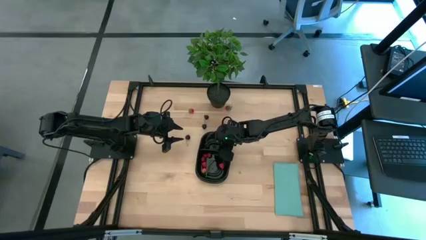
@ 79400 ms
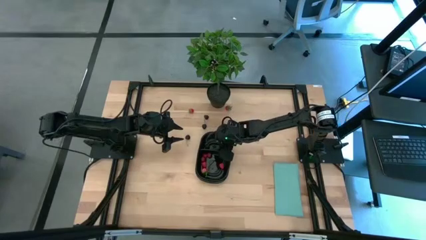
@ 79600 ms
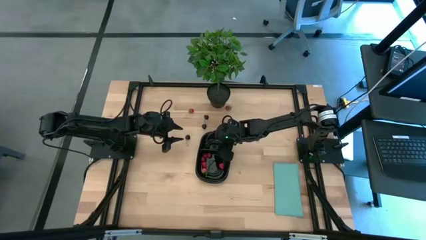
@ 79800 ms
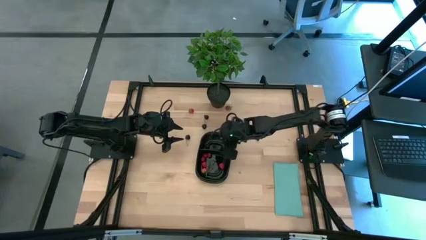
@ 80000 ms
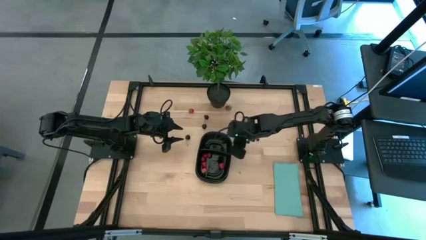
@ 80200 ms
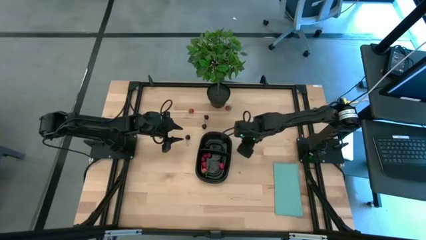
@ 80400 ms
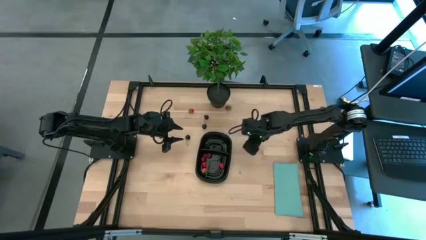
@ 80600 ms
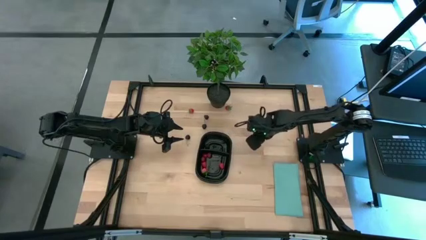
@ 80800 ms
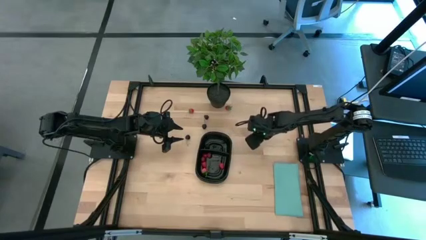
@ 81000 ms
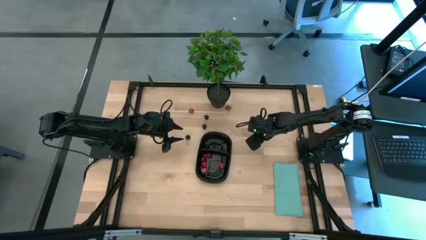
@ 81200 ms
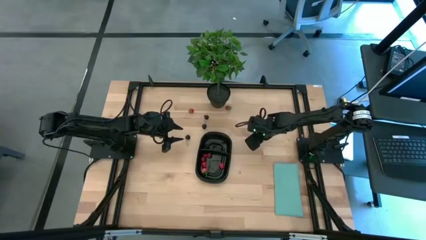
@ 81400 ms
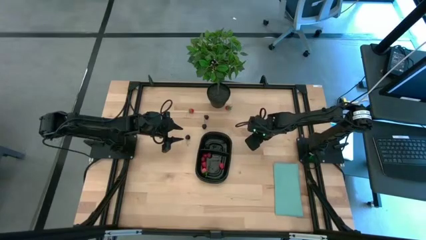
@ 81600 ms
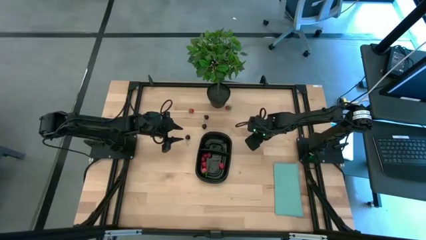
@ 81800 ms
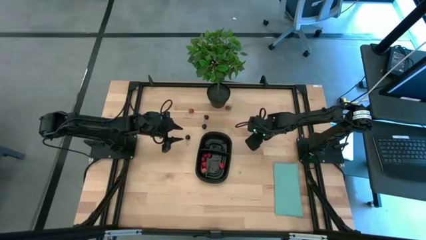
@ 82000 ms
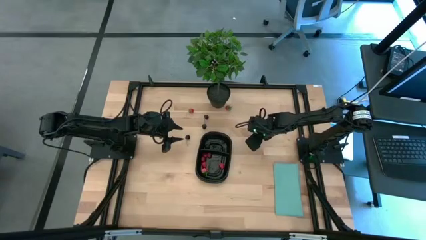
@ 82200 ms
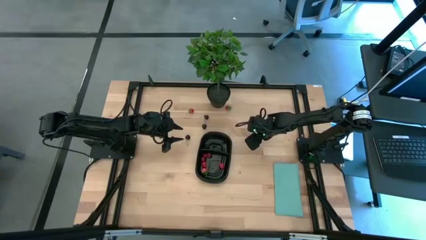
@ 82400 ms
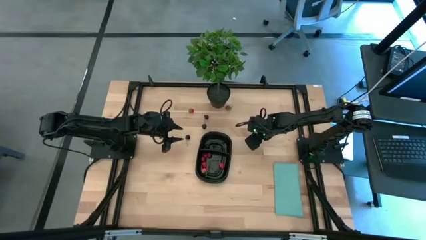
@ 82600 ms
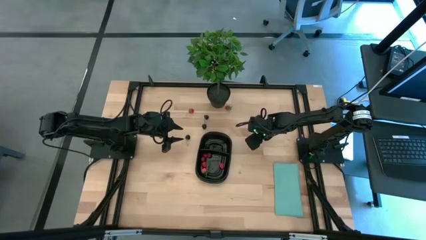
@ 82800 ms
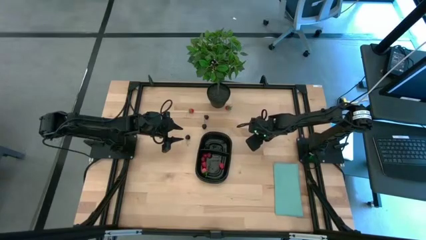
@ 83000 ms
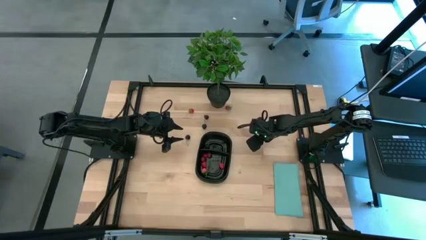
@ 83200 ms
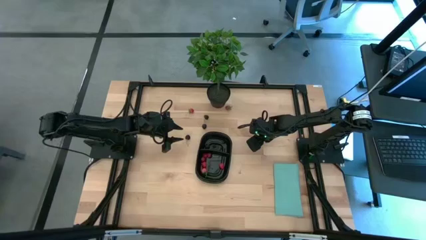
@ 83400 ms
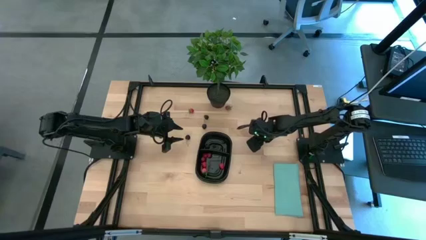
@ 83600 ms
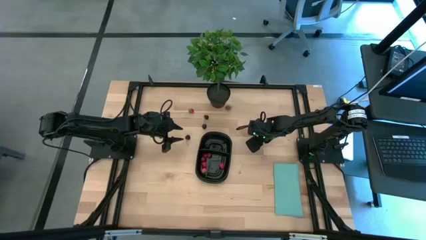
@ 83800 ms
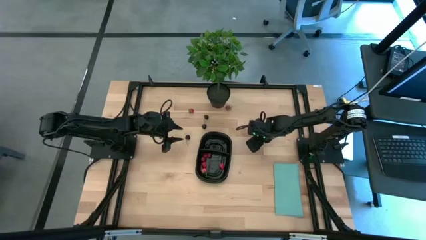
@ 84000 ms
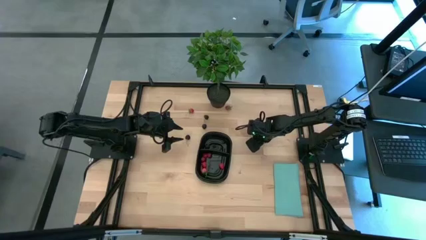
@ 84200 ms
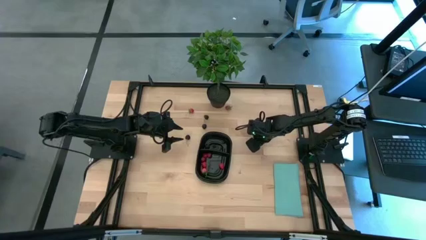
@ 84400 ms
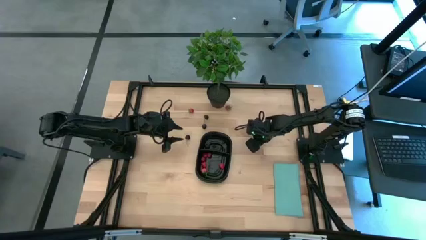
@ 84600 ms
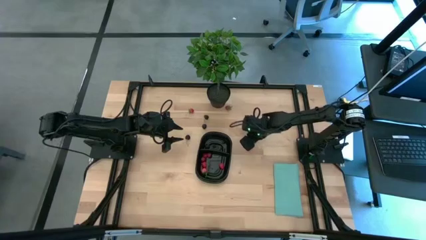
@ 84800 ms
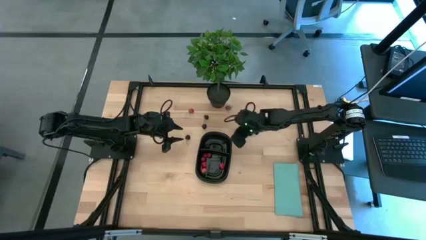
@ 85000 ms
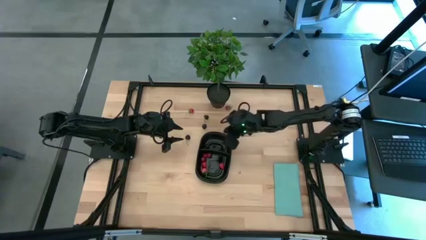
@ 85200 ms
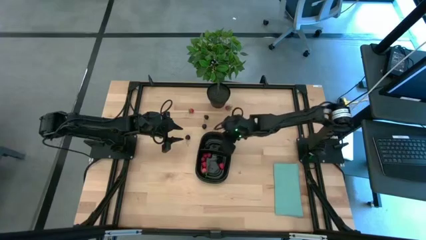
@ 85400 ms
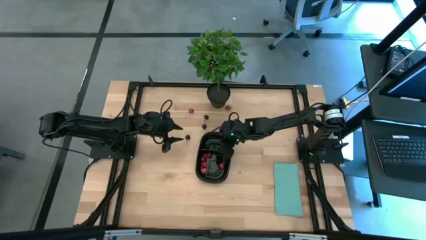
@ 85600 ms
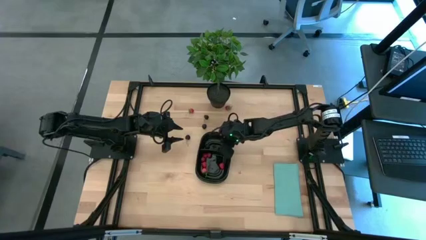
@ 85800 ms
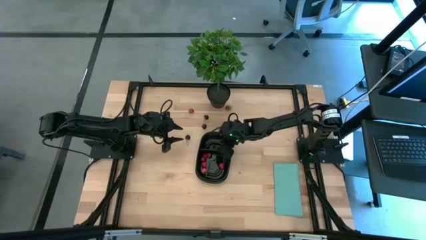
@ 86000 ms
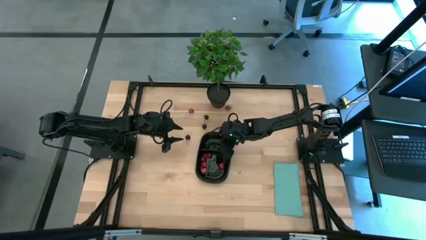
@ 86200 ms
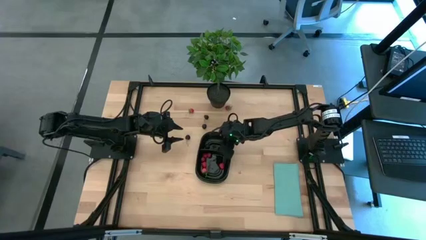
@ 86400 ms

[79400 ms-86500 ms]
Task: Pick and placing Produce into tupperware
Put the blueberry into the black container with the other black fruit

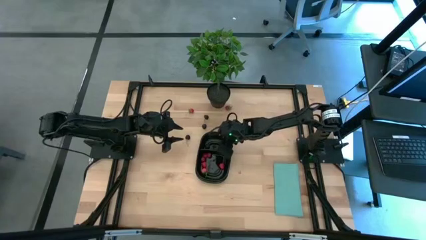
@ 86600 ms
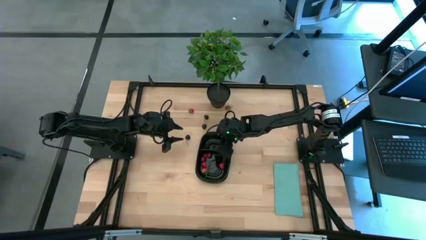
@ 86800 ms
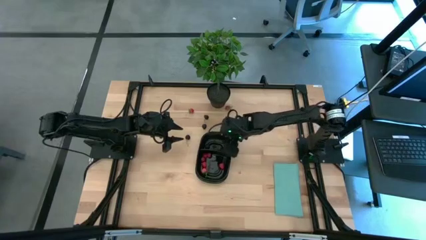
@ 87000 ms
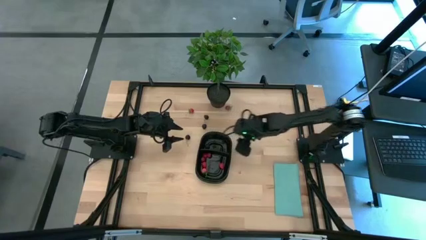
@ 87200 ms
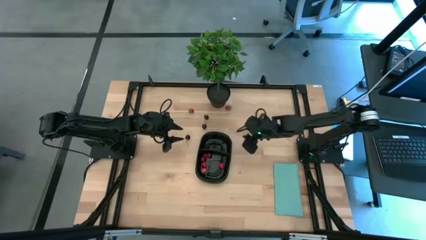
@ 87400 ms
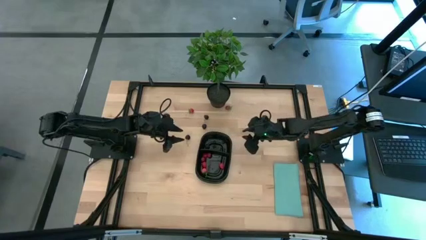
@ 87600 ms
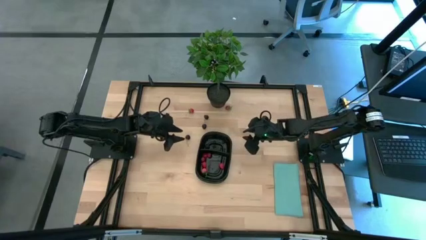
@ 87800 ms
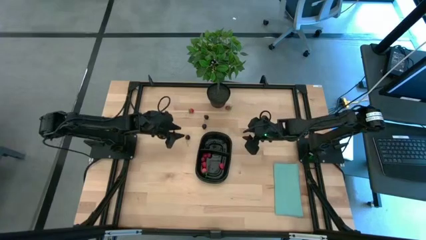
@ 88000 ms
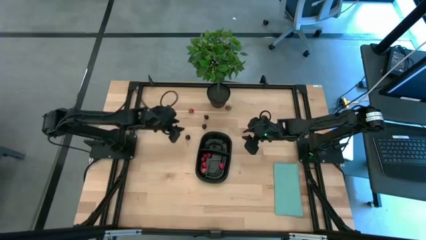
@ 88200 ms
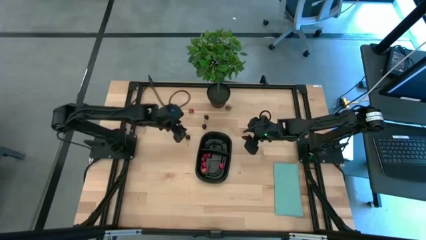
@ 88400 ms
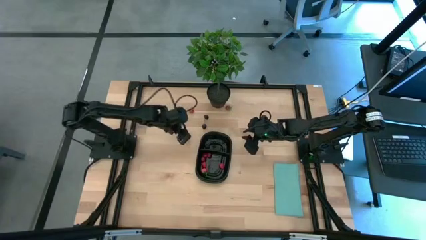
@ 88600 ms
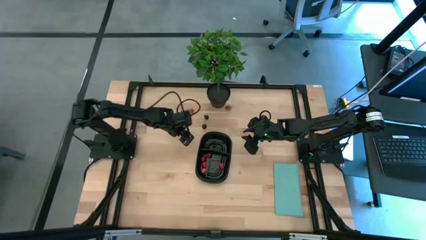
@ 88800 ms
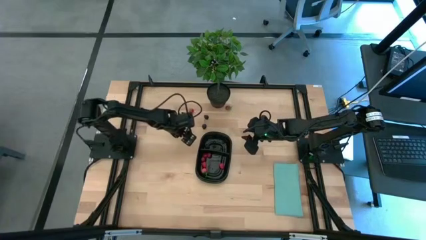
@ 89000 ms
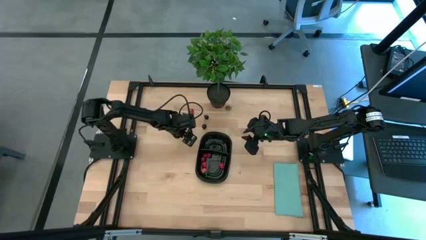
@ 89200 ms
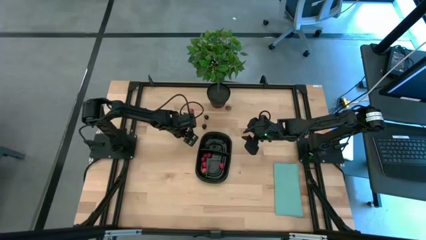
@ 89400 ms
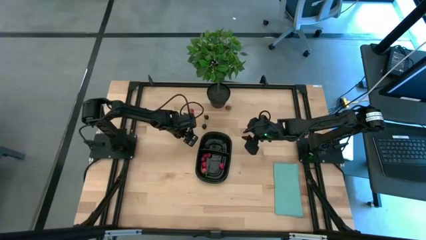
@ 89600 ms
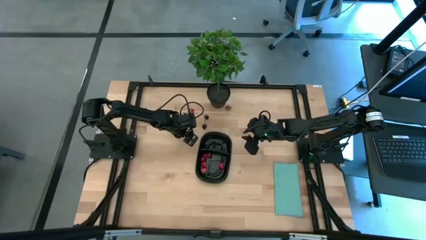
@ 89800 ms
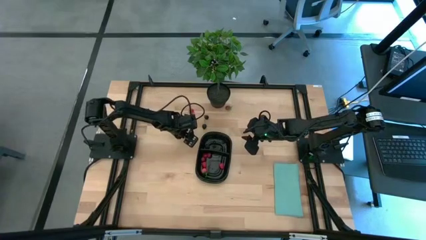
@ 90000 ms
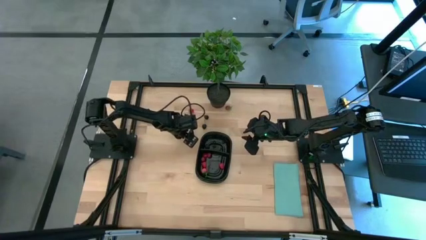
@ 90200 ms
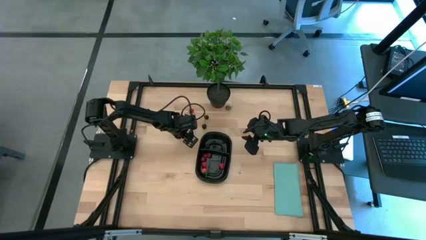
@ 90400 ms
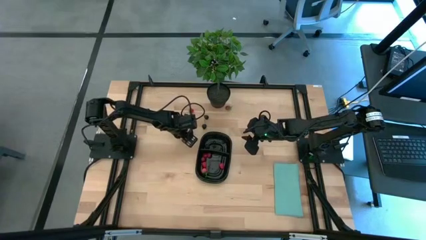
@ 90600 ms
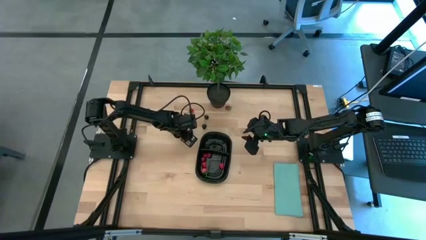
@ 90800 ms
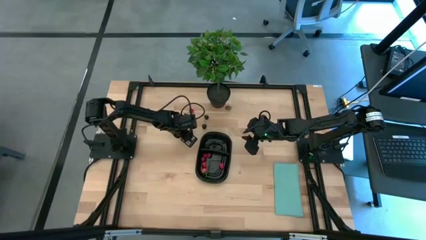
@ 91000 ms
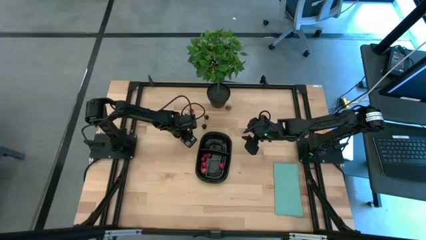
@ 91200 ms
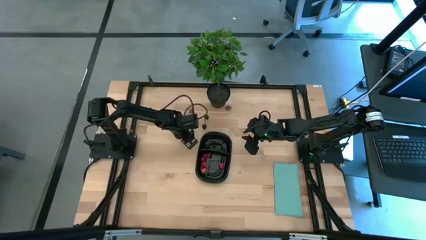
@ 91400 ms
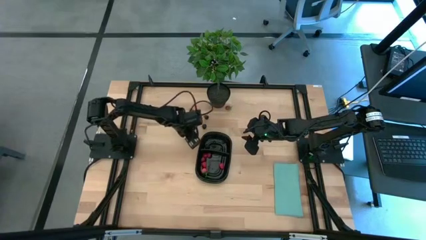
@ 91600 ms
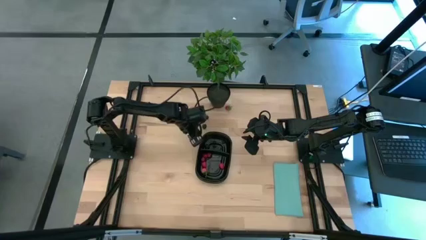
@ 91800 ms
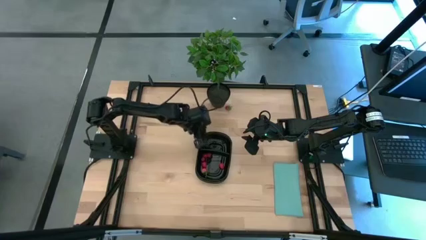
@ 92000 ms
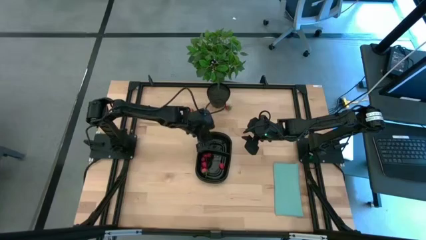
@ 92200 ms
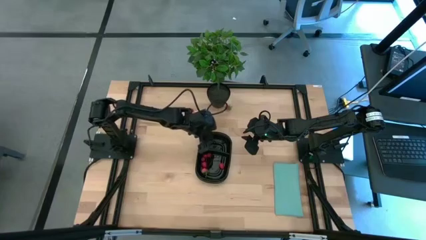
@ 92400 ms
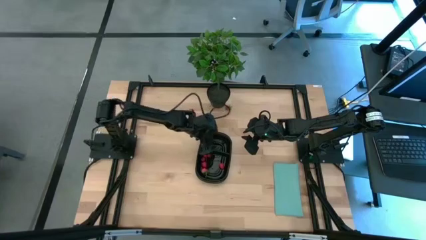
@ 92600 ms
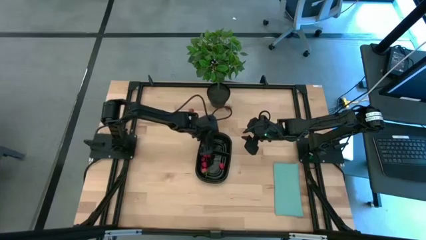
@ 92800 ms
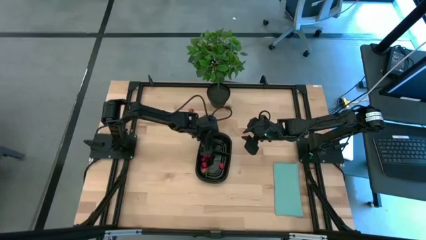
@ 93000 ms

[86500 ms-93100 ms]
Put the bottom black cherry into the black container with the other black fruits
